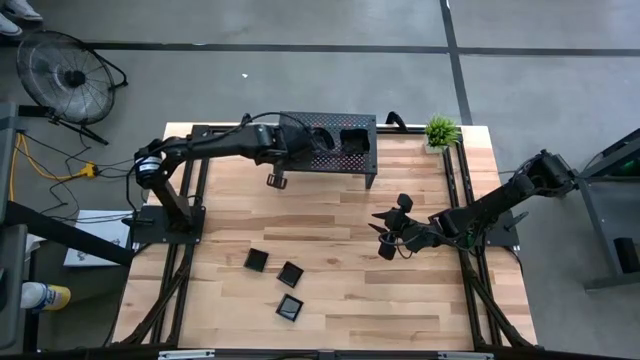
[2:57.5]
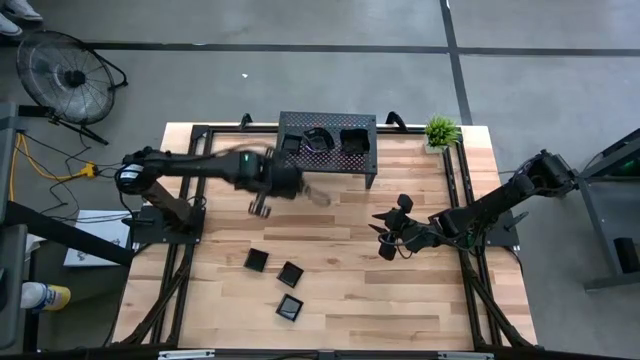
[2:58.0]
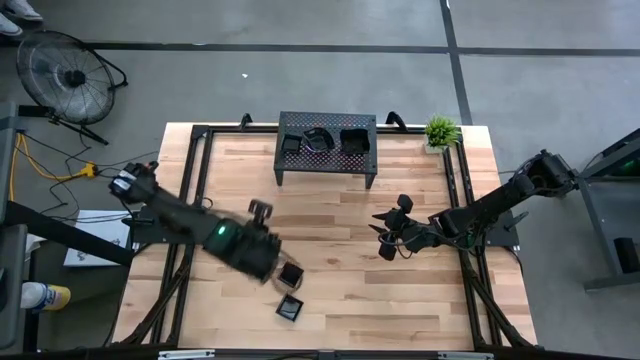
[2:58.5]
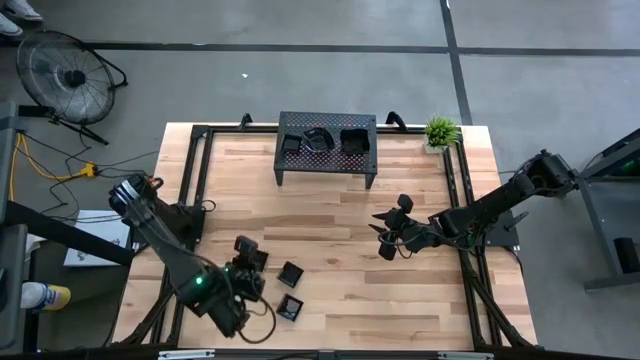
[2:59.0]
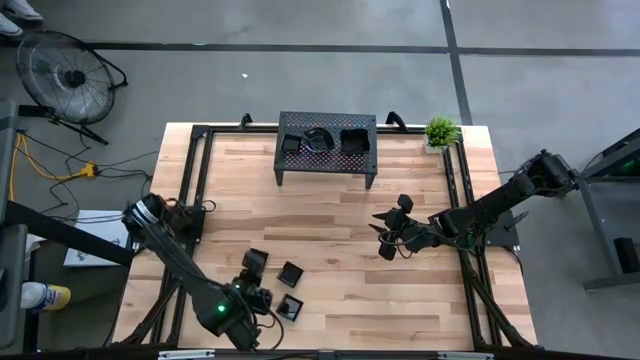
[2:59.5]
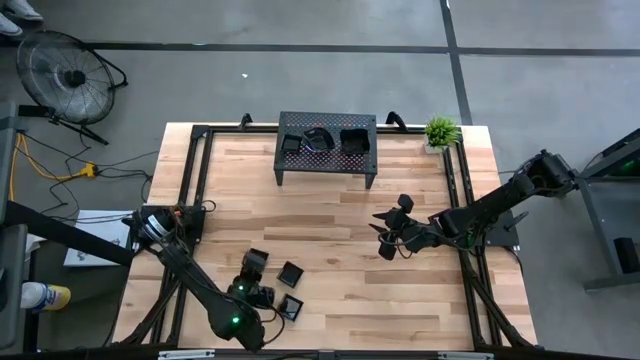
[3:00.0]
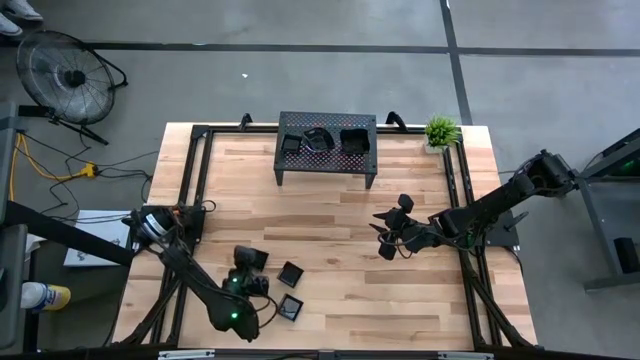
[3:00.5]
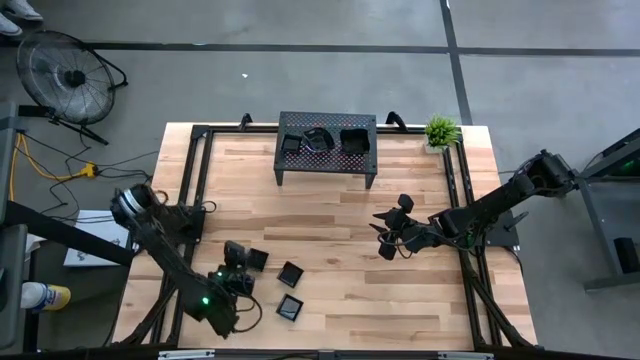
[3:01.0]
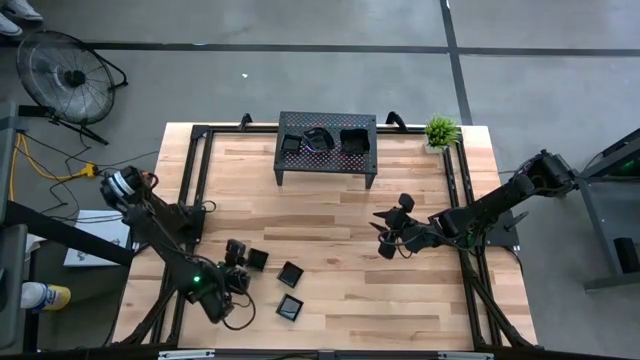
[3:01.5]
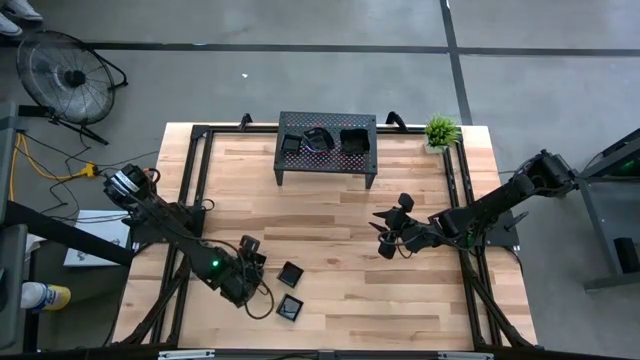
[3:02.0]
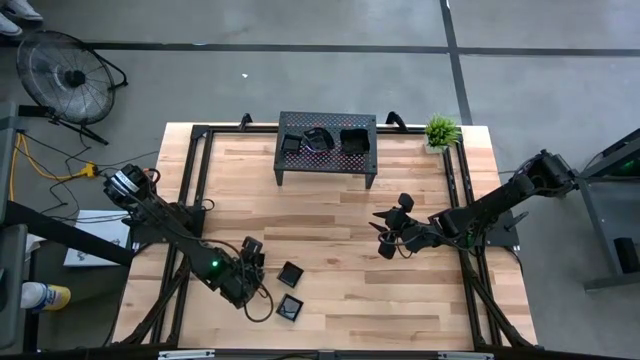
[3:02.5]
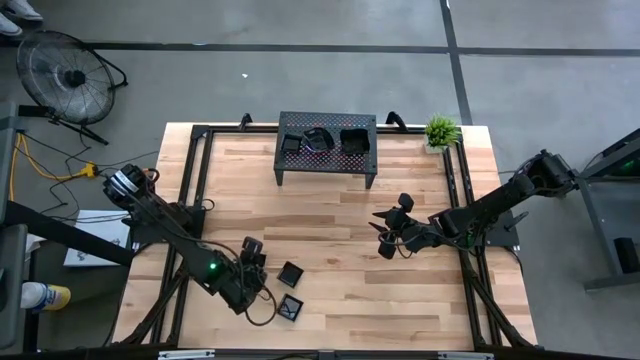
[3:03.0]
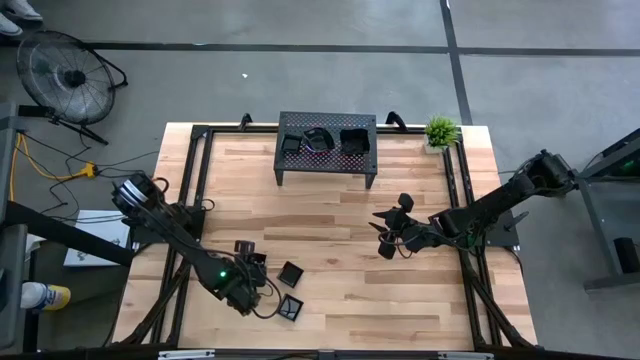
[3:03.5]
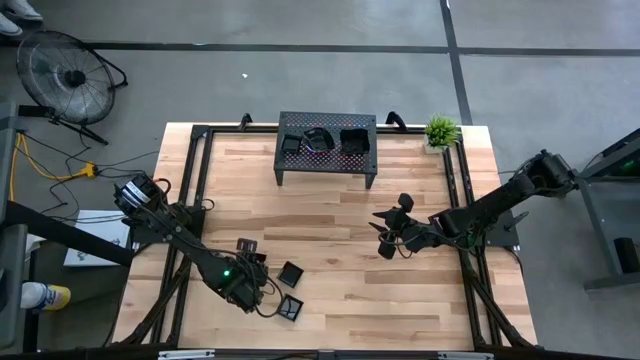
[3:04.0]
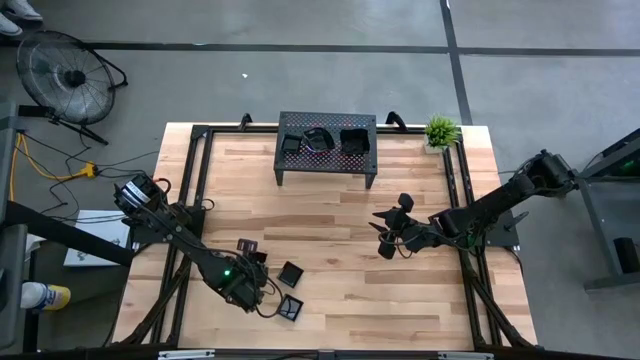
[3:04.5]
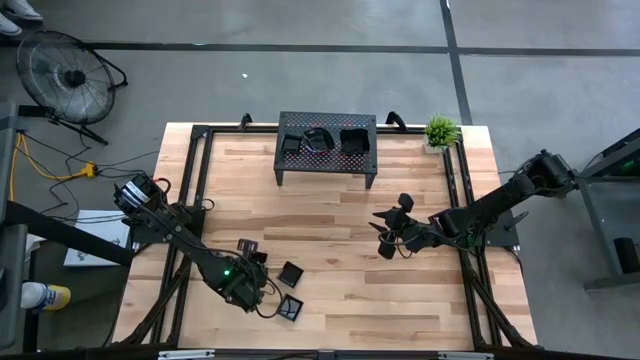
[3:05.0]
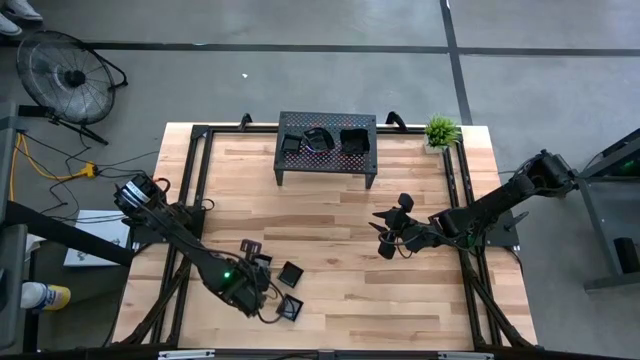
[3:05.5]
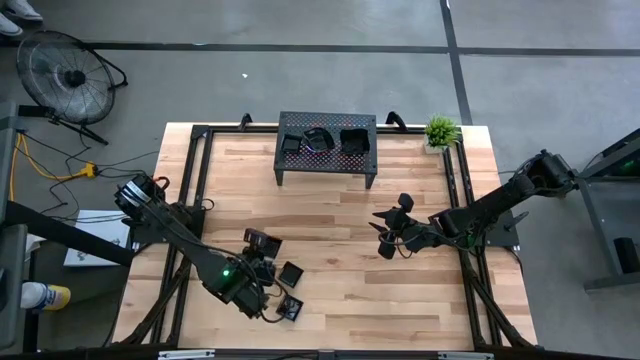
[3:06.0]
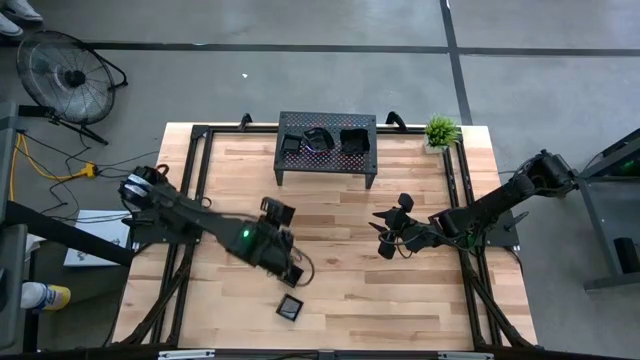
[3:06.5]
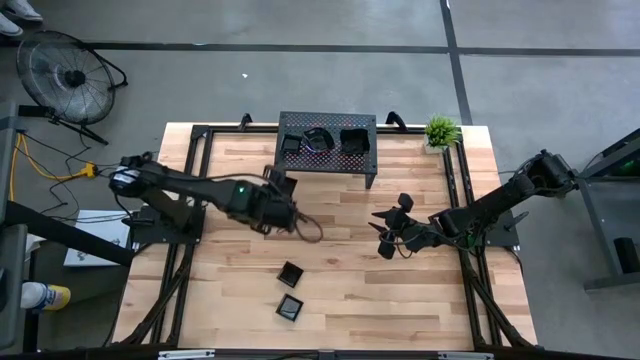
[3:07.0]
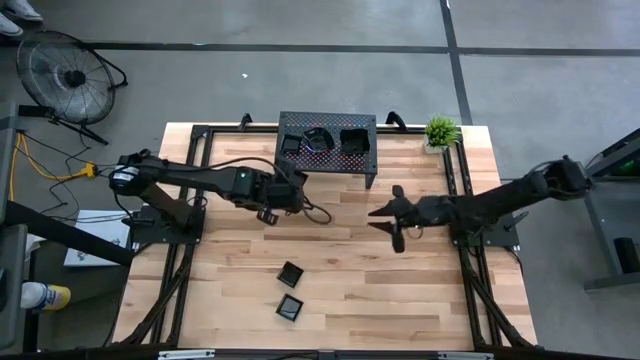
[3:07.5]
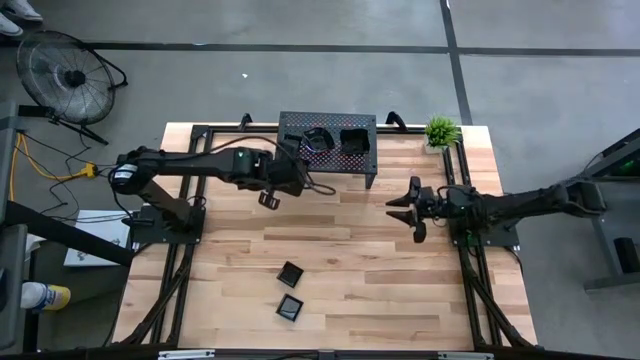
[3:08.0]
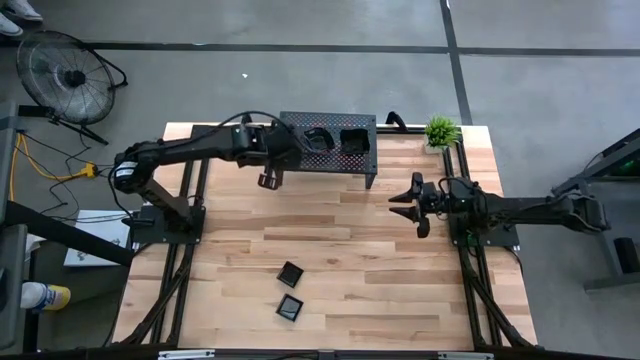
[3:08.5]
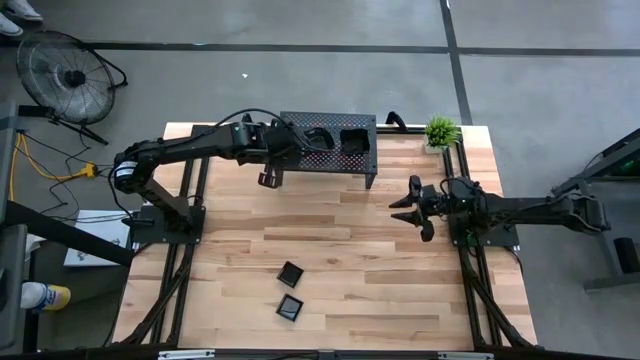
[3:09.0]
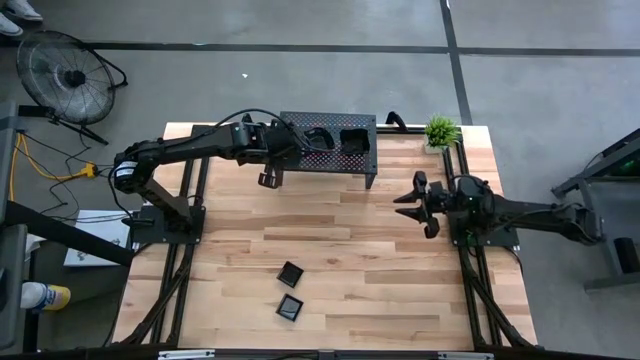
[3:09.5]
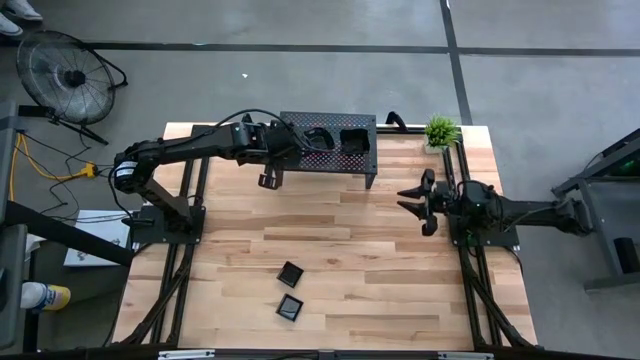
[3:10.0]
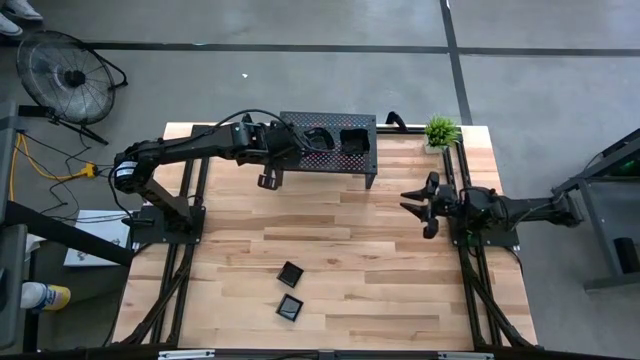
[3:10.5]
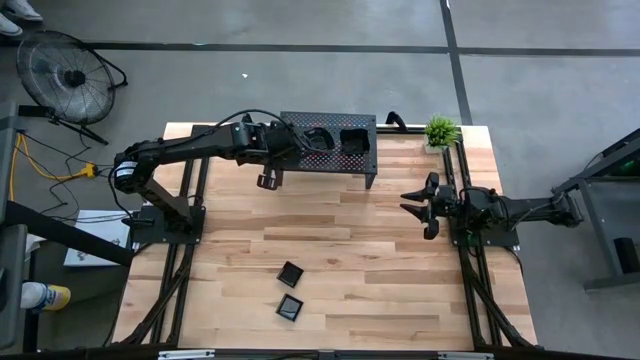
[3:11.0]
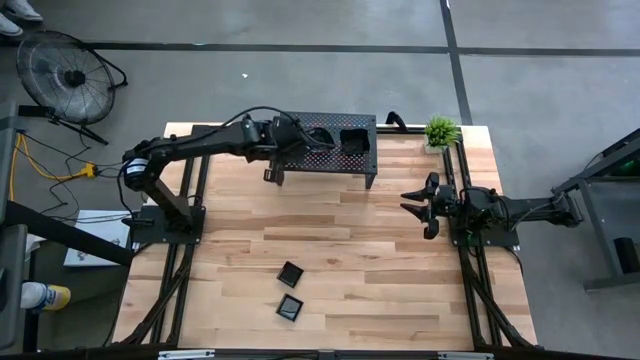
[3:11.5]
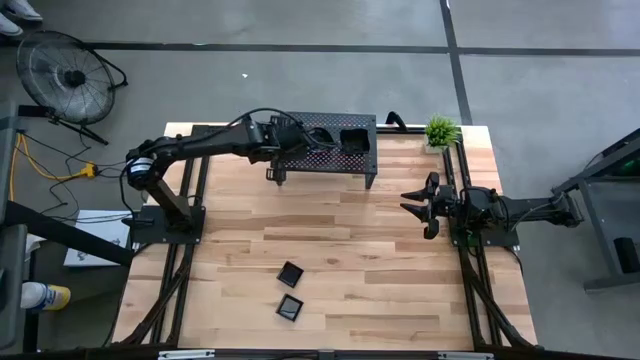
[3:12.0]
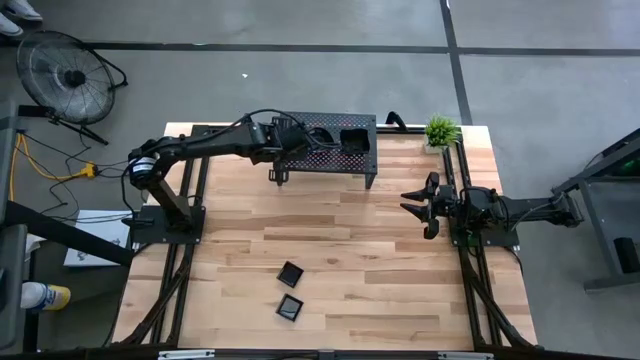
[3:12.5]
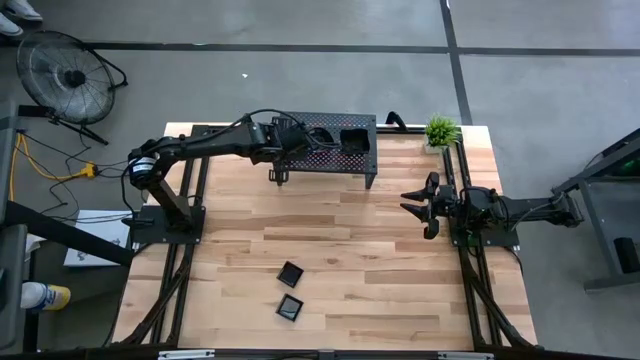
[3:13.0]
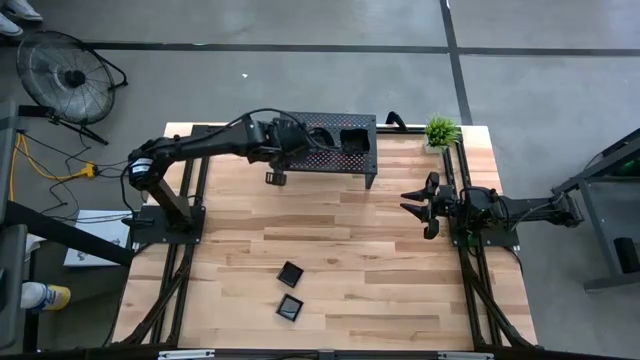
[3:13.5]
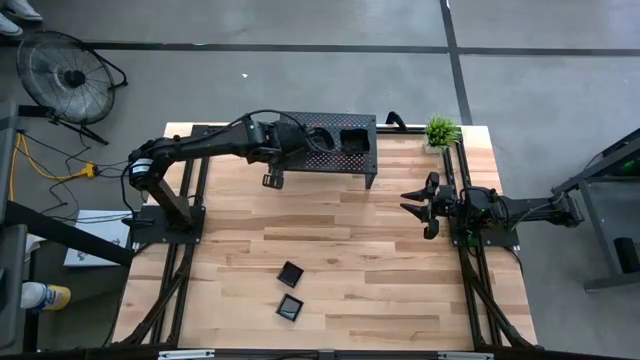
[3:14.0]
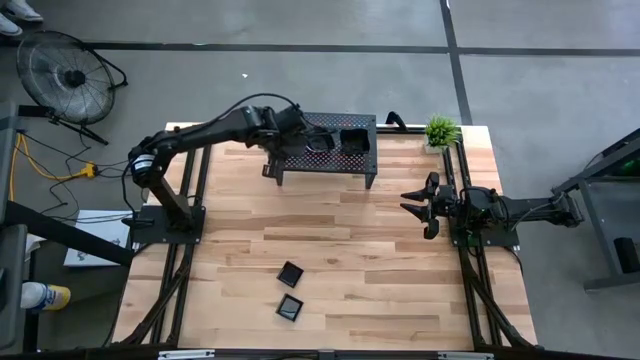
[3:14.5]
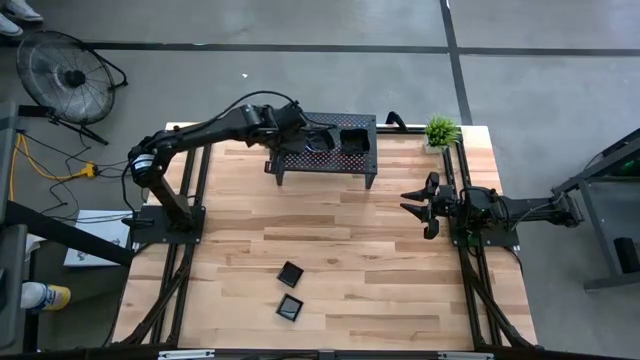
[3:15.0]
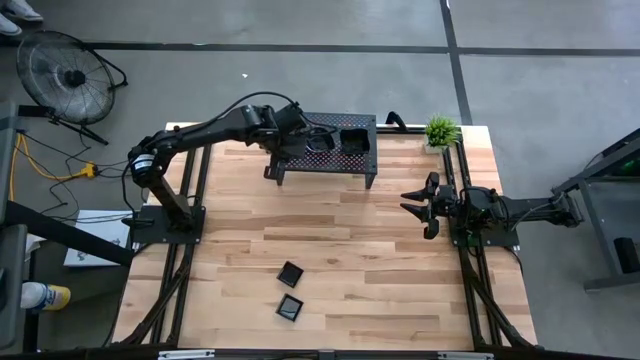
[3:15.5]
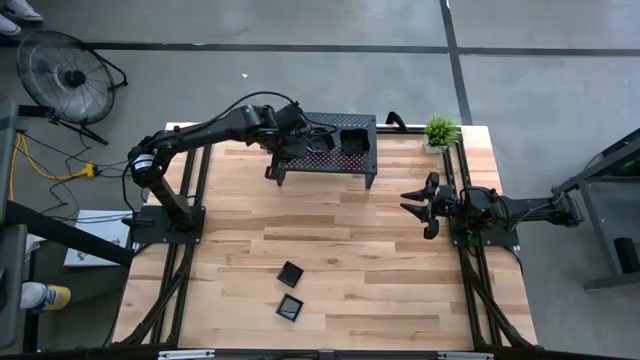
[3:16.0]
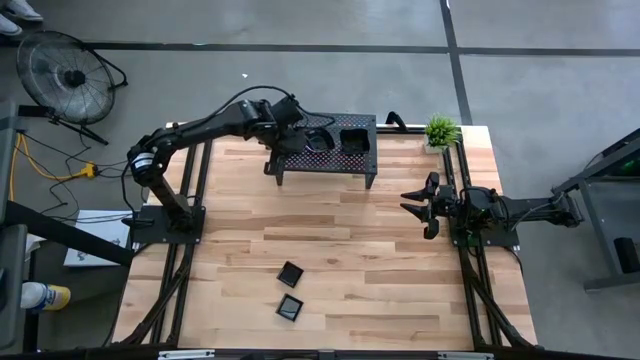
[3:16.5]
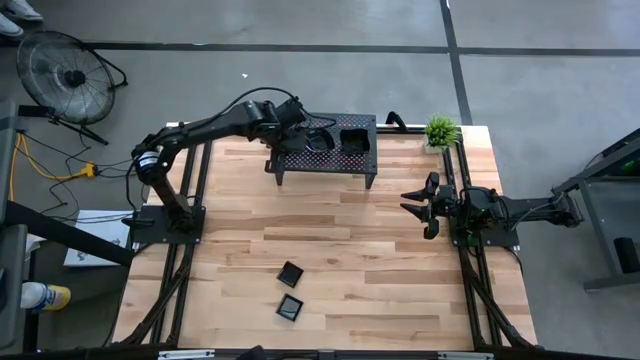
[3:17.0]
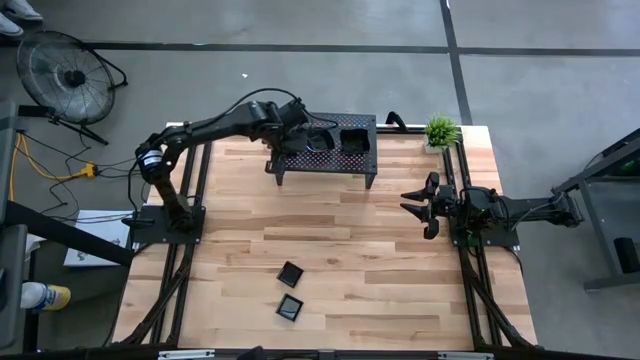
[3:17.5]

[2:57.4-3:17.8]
Task: Pick & Place Mini shaped plates
Stack the top left black square plate on top of the black square plates on the shelf

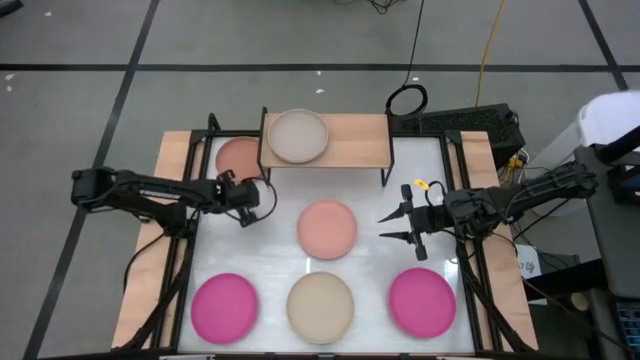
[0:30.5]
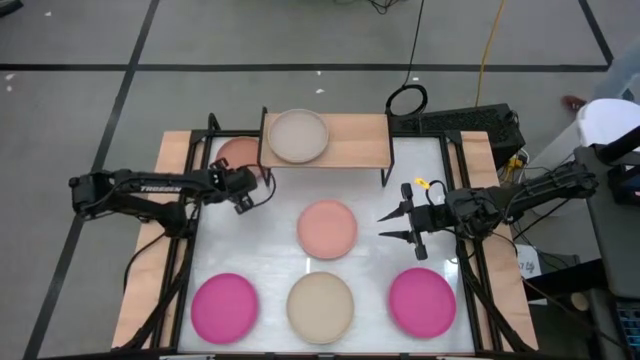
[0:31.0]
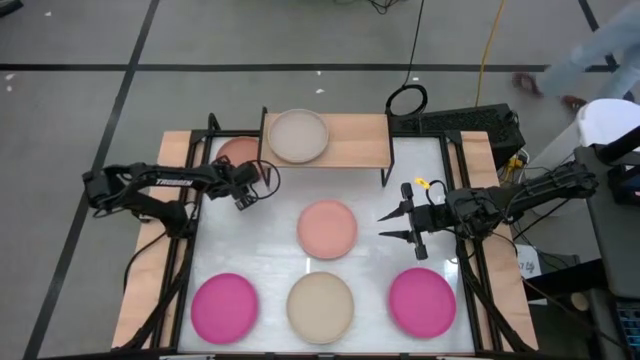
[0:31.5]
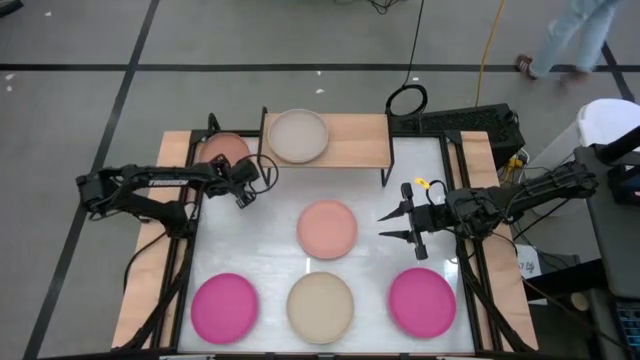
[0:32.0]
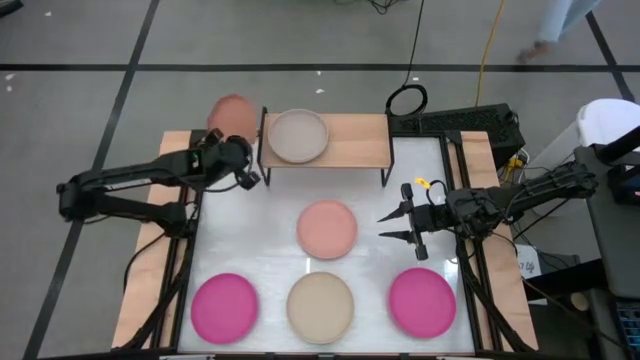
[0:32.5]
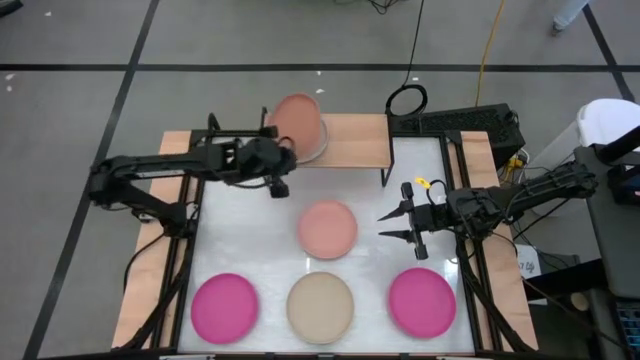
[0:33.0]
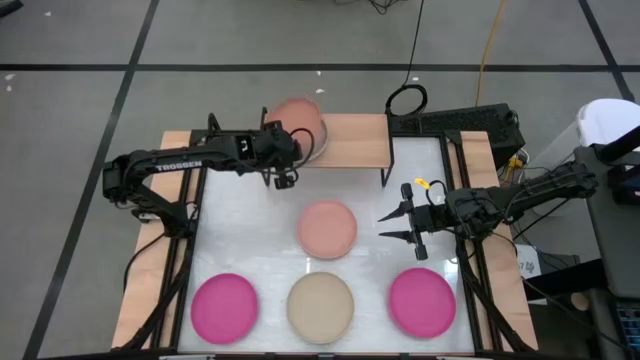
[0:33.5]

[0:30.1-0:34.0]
Task: Place and stack plates onto a shelf
Stack the top right orange plate on top of the brown plate on the shelf
